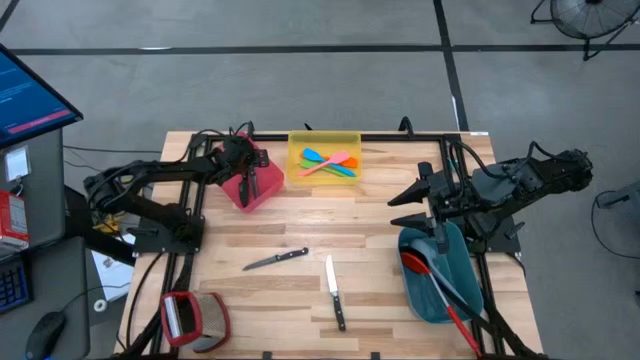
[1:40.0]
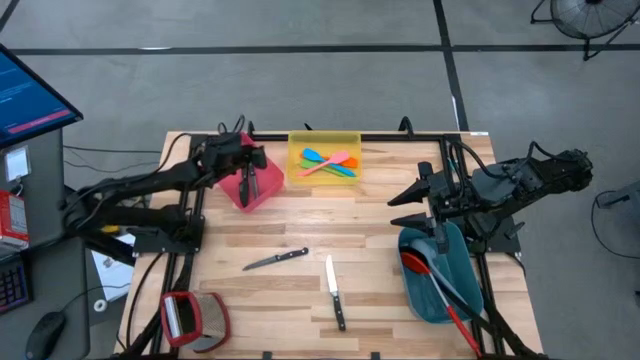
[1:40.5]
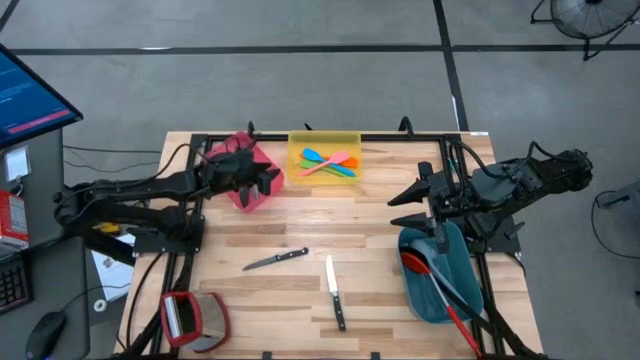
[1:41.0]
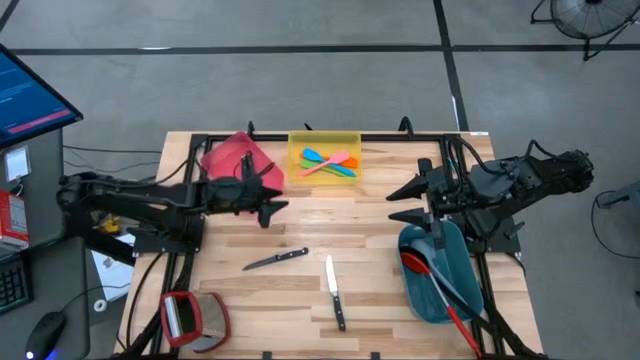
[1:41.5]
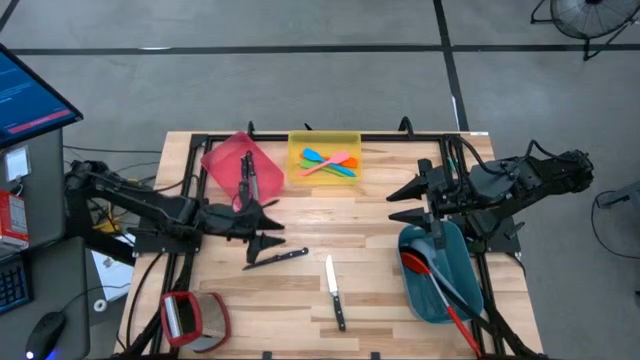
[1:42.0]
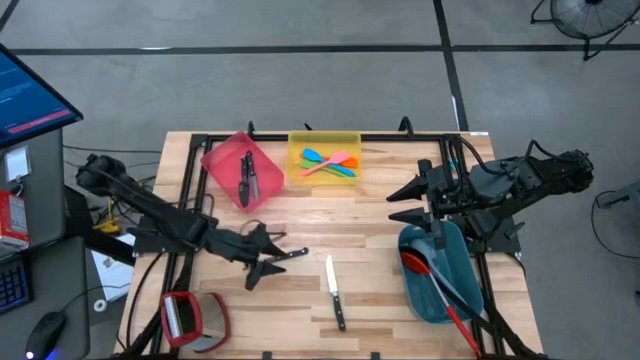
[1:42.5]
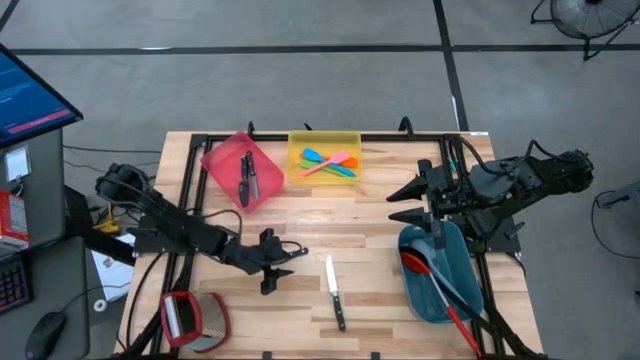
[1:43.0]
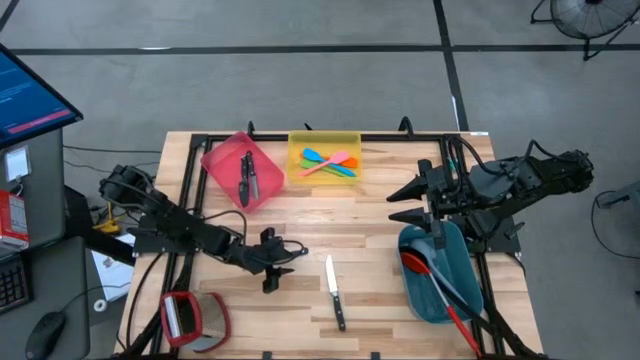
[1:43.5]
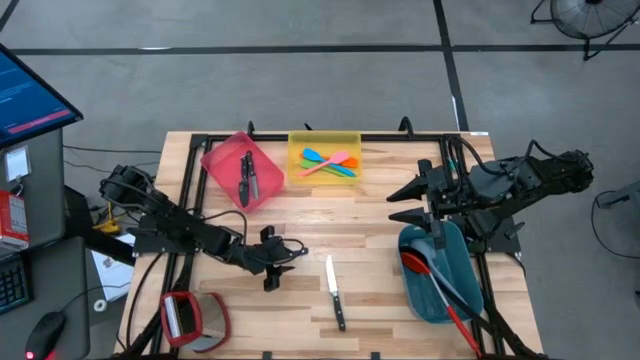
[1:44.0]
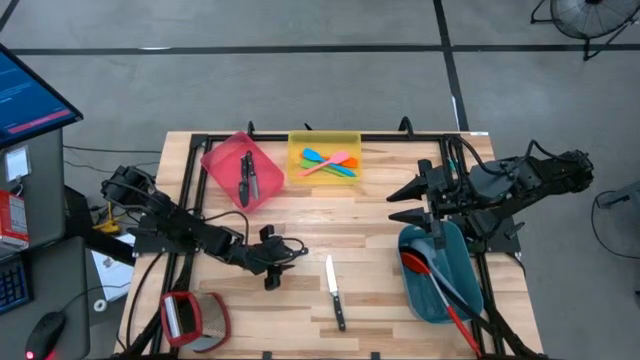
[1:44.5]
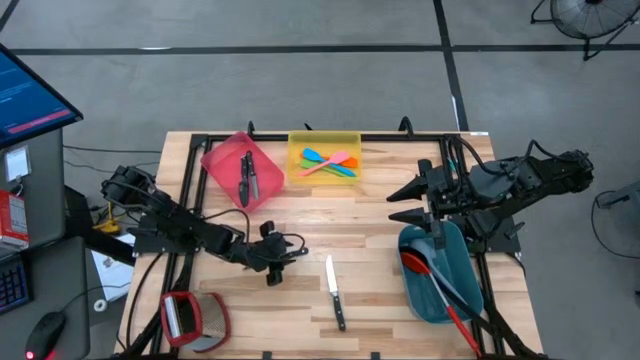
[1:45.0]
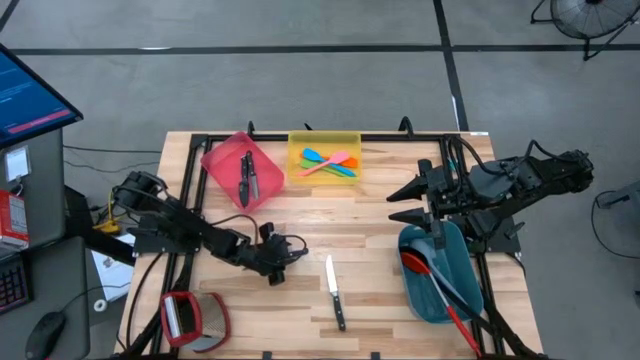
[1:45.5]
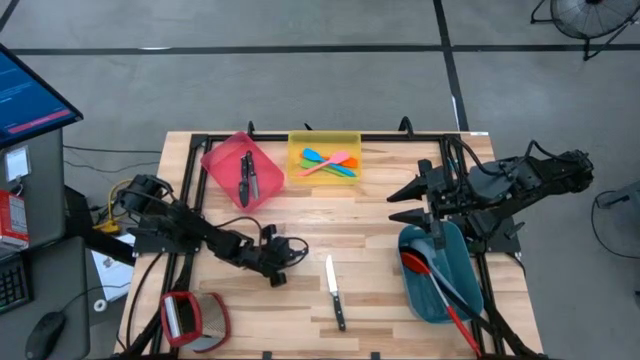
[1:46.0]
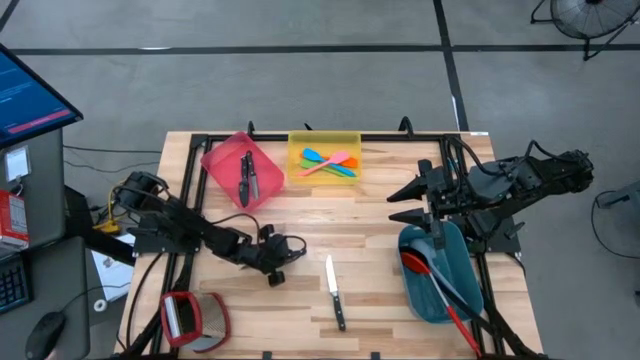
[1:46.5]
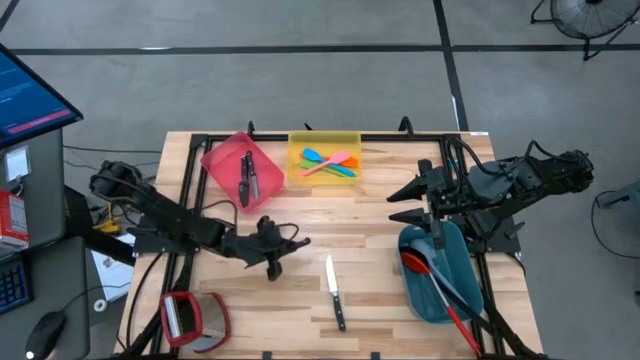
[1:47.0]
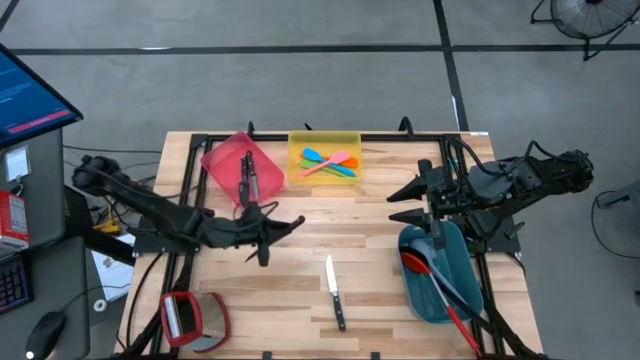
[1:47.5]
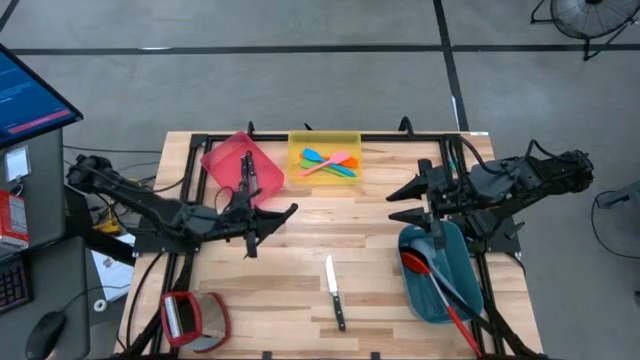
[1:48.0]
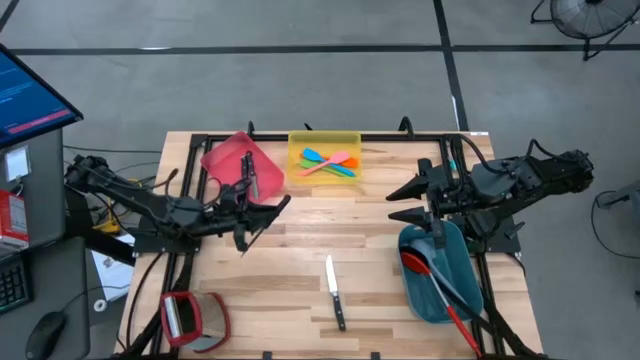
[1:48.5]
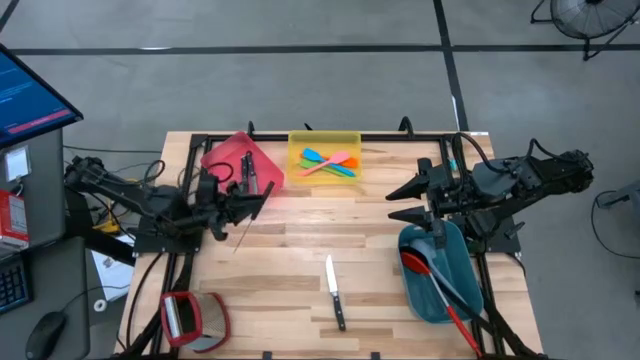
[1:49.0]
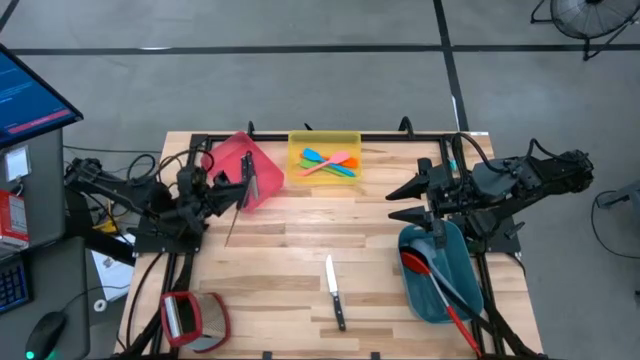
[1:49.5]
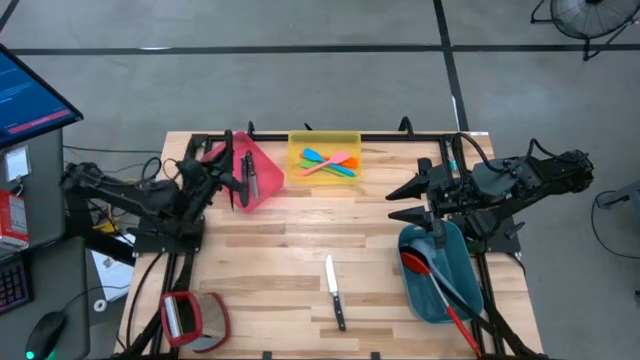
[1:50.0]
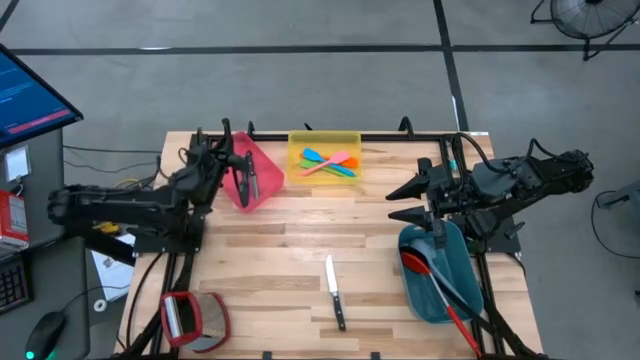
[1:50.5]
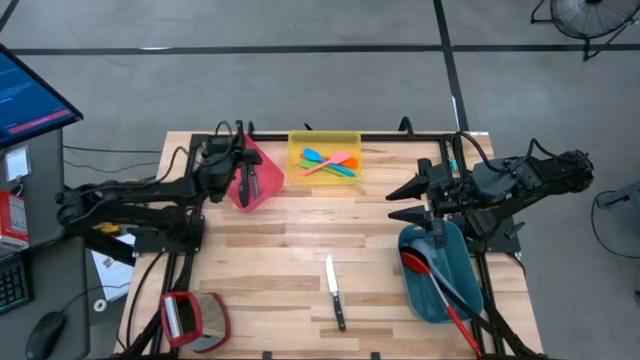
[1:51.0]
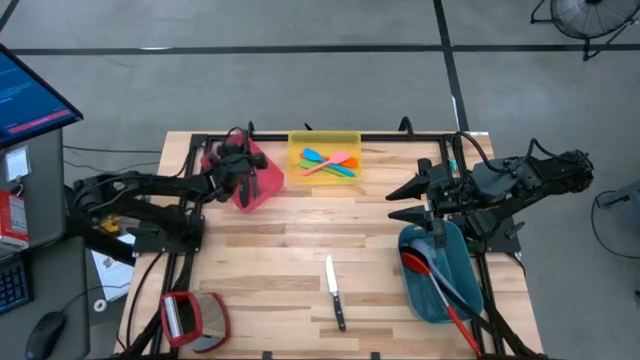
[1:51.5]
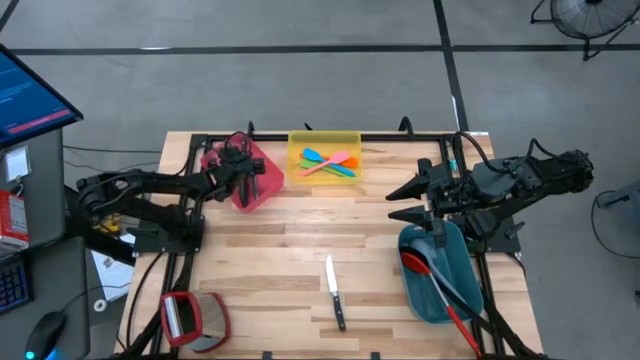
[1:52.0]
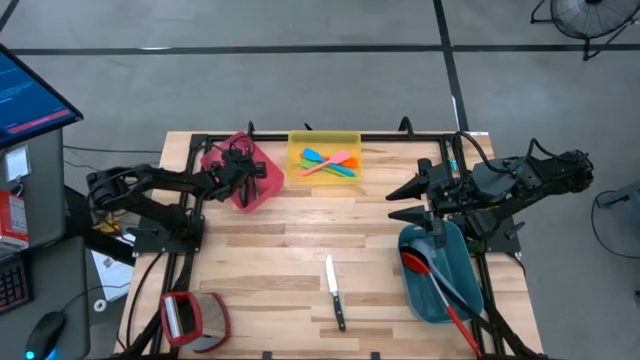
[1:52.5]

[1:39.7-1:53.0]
Task: Pick & Place Kitchen Items
Put the top silver knife into the pink bin

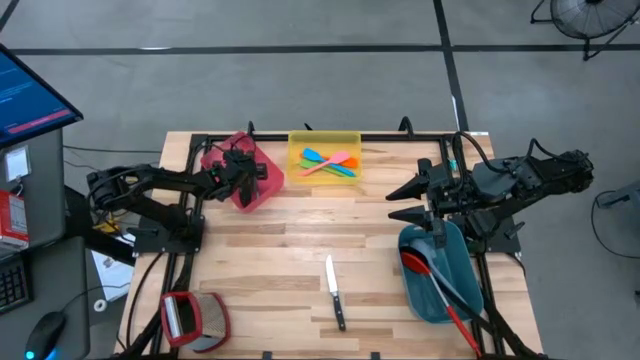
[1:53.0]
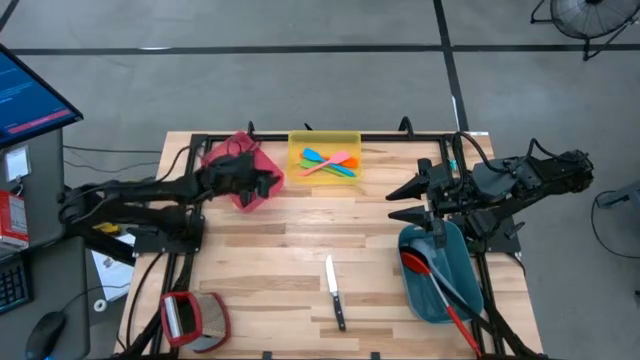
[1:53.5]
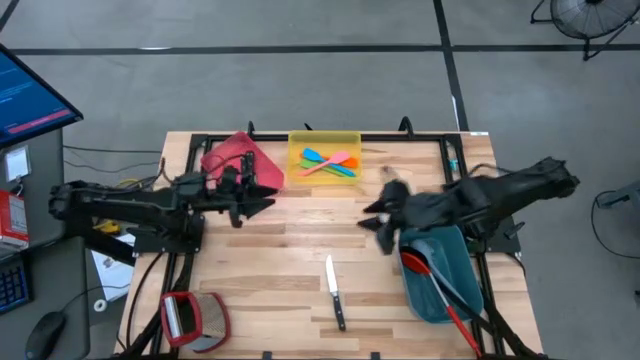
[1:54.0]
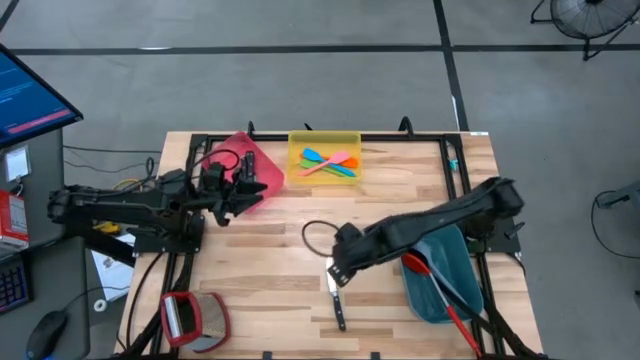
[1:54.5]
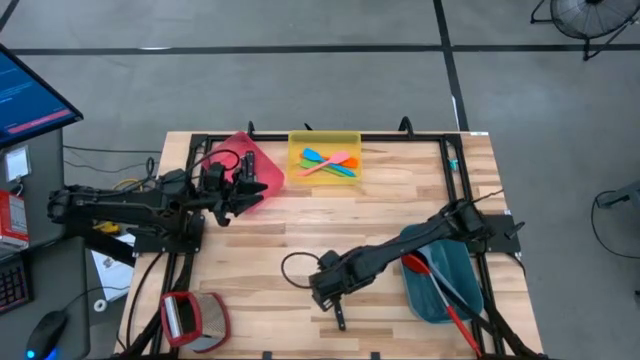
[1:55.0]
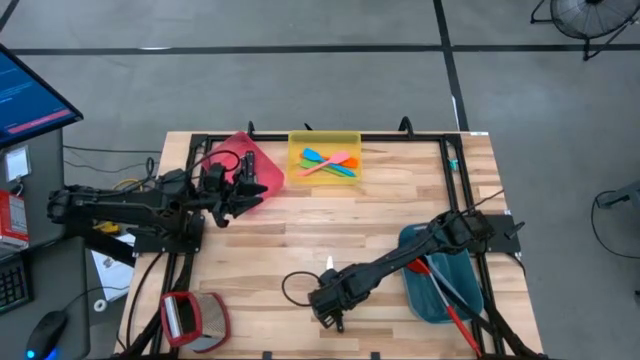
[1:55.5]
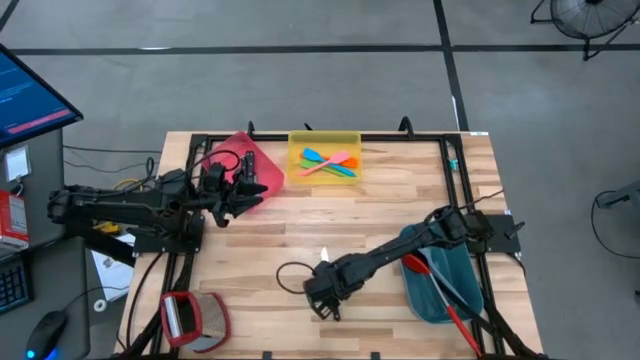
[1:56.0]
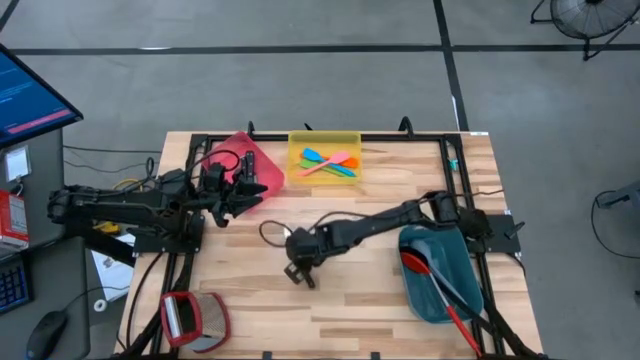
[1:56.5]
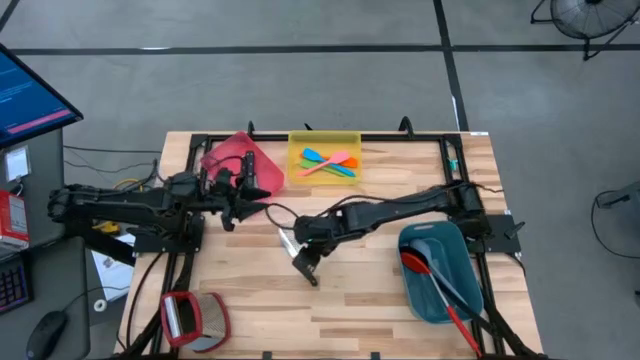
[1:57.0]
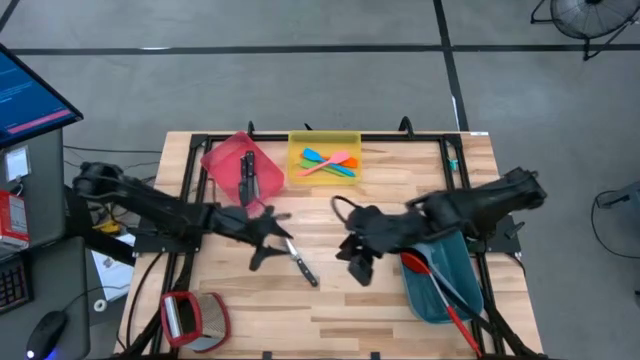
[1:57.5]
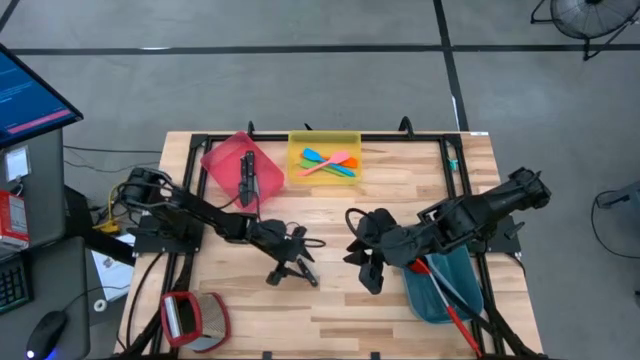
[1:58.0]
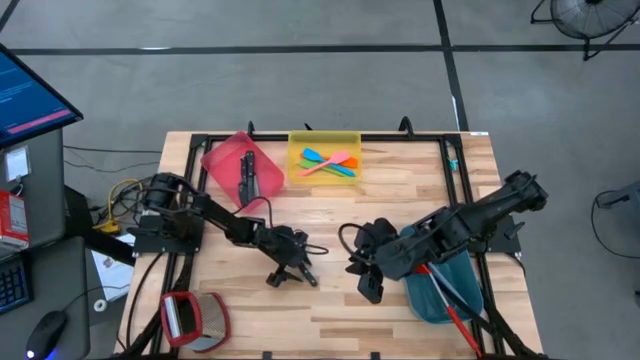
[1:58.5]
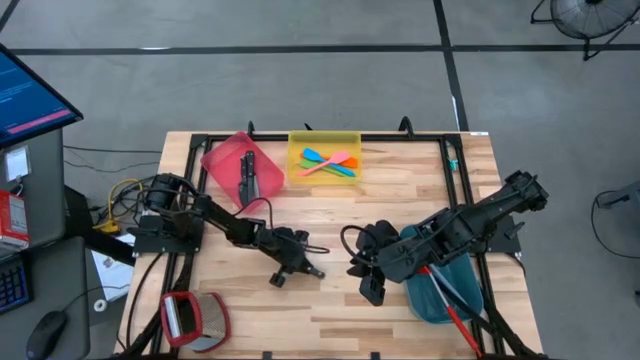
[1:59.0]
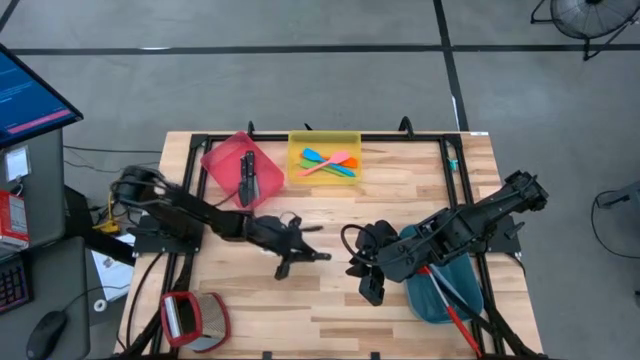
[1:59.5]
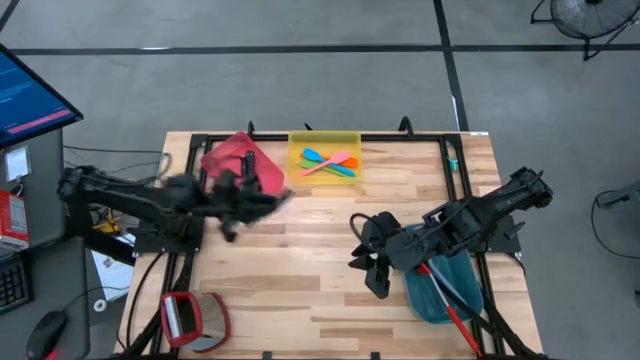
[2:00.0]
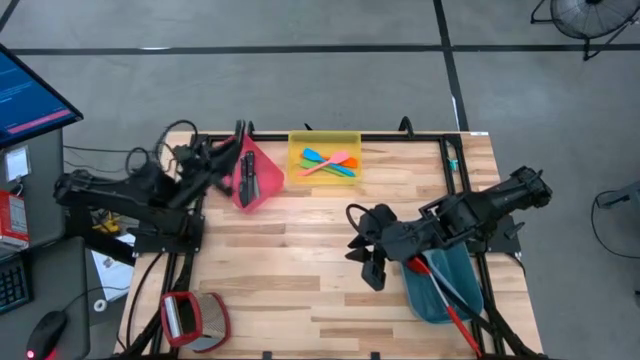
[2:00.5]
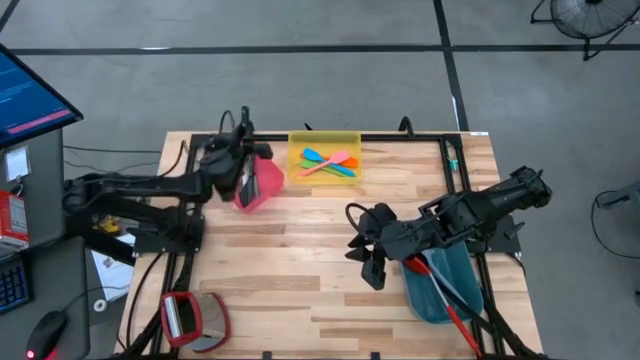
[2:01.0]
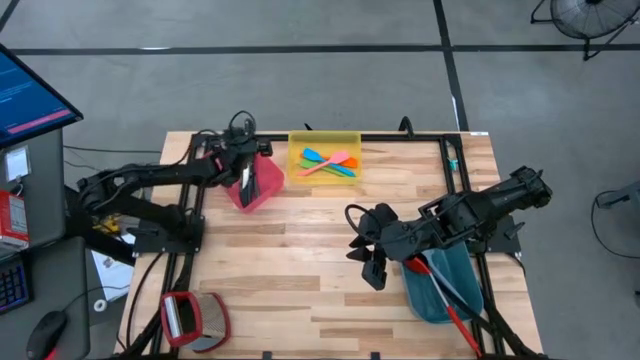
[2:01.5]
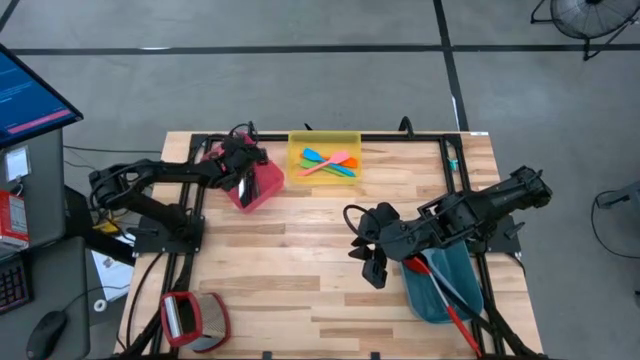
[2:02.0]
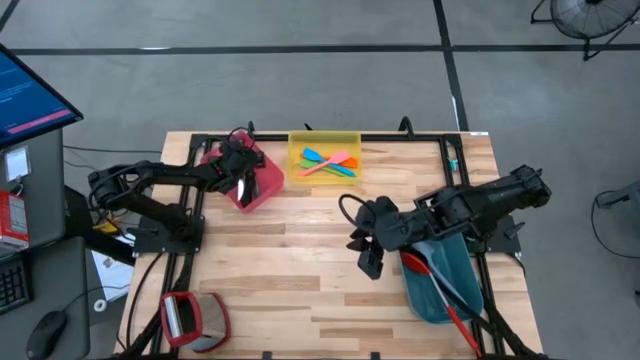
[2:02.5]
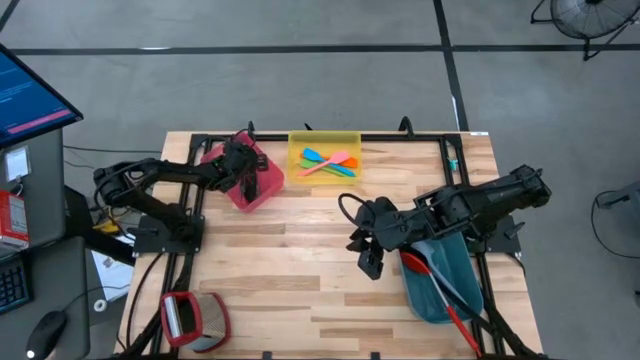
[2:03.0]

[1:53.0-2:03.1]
Put the silver blade knife into the pink bin
